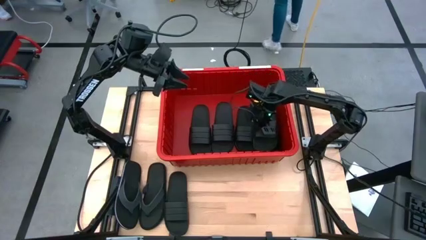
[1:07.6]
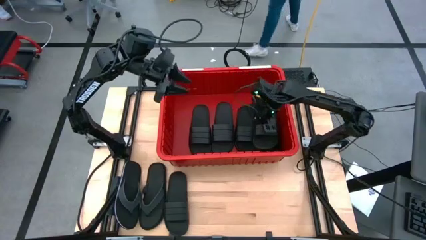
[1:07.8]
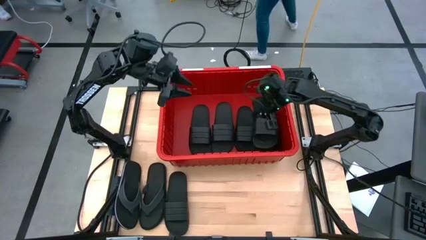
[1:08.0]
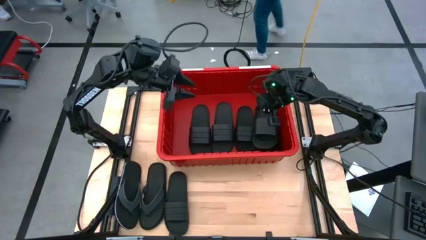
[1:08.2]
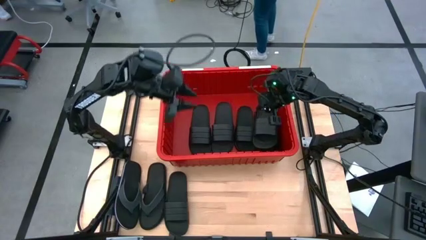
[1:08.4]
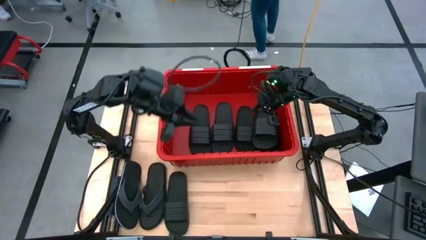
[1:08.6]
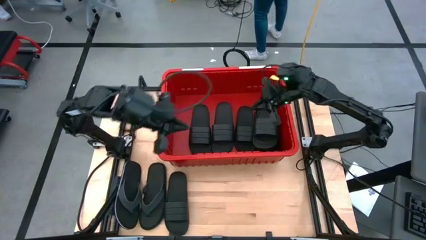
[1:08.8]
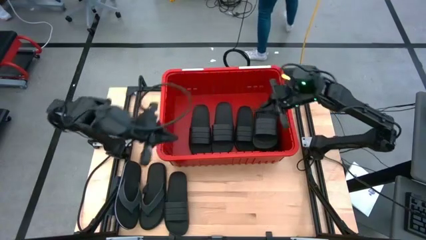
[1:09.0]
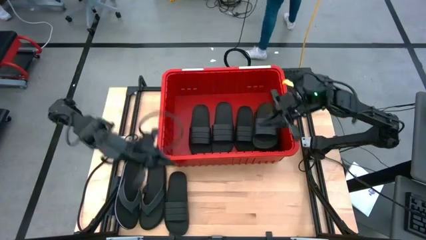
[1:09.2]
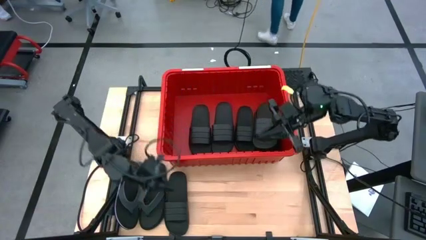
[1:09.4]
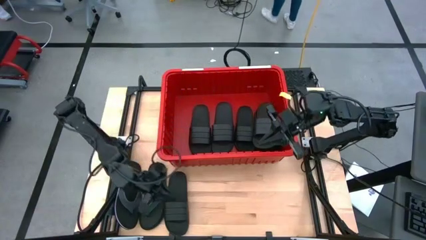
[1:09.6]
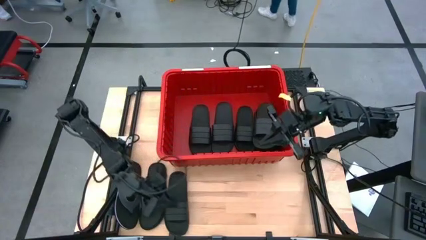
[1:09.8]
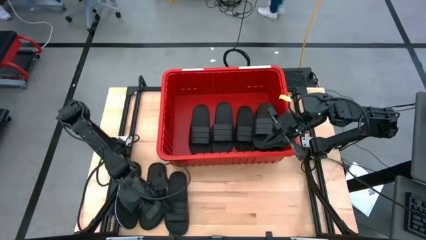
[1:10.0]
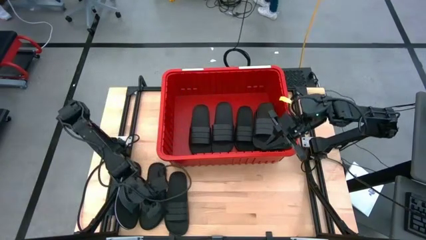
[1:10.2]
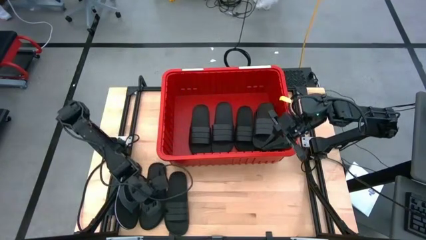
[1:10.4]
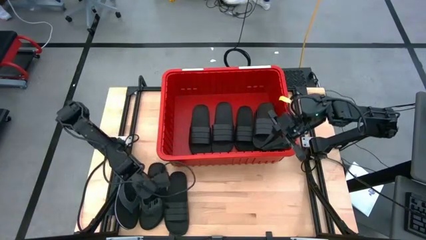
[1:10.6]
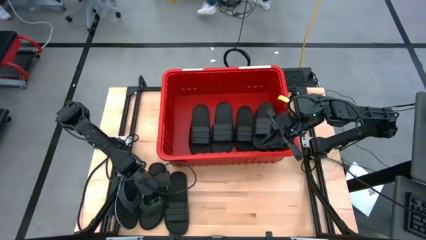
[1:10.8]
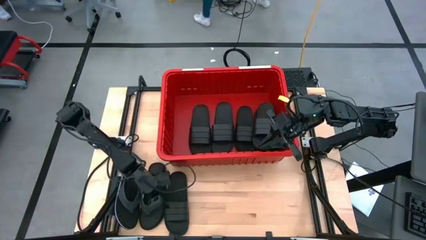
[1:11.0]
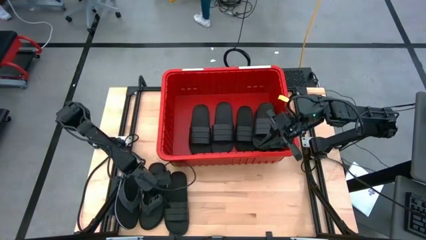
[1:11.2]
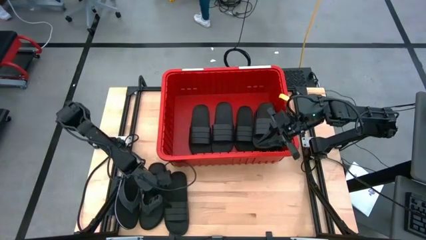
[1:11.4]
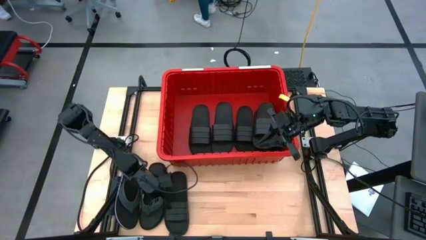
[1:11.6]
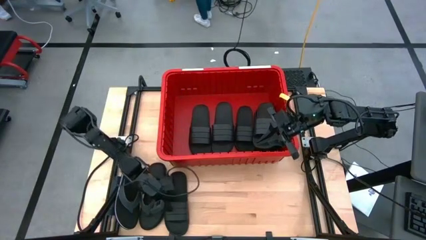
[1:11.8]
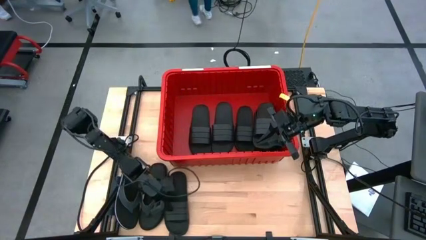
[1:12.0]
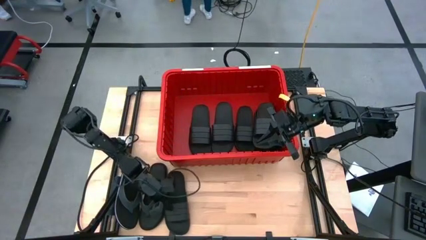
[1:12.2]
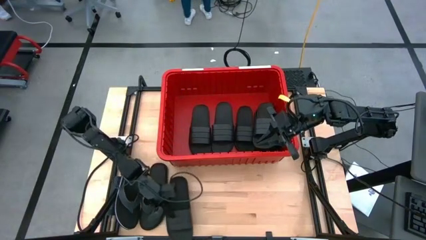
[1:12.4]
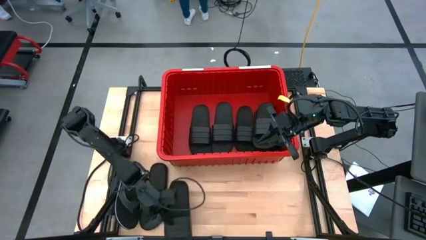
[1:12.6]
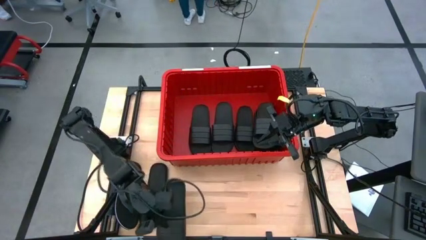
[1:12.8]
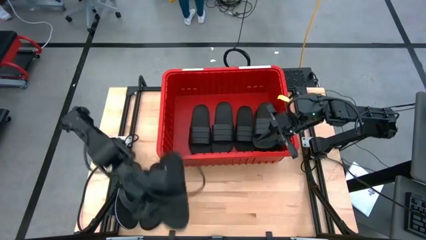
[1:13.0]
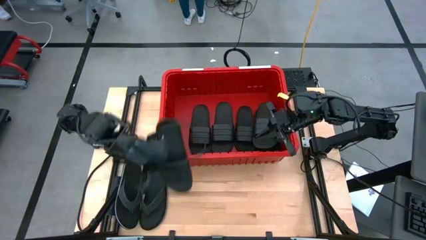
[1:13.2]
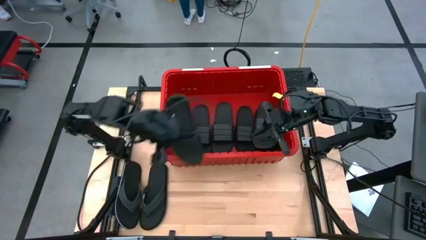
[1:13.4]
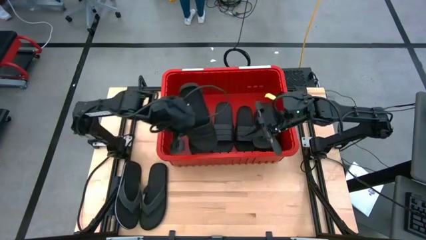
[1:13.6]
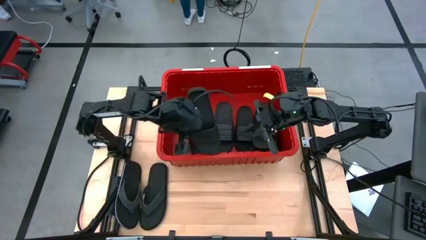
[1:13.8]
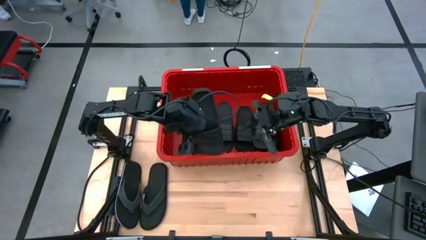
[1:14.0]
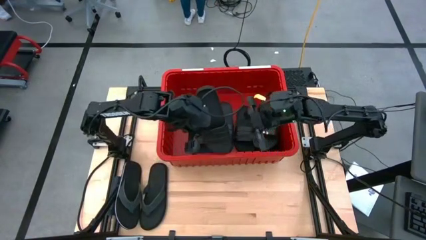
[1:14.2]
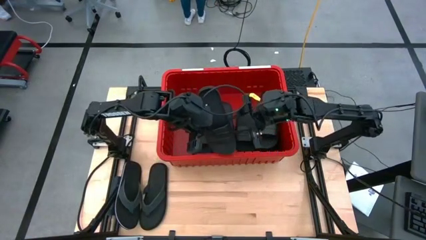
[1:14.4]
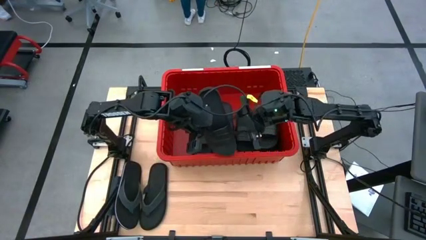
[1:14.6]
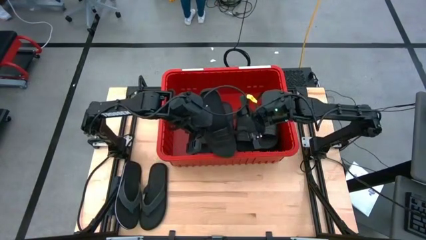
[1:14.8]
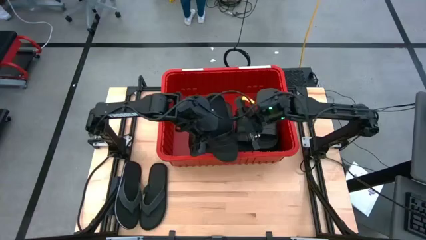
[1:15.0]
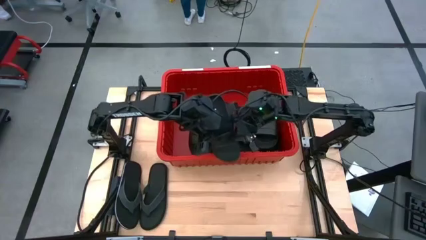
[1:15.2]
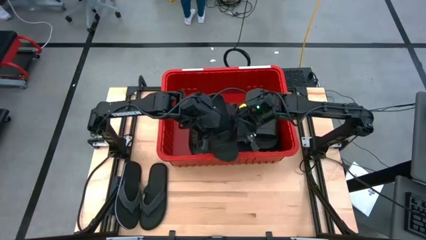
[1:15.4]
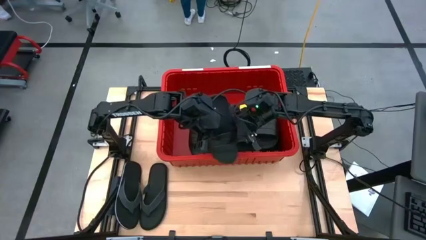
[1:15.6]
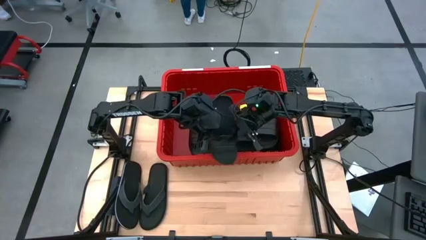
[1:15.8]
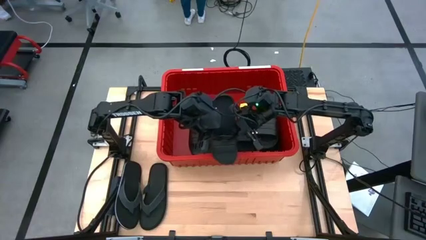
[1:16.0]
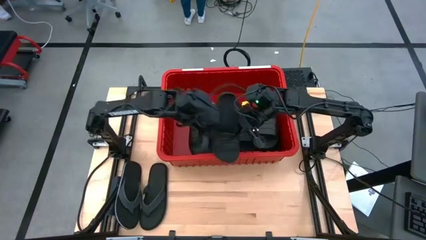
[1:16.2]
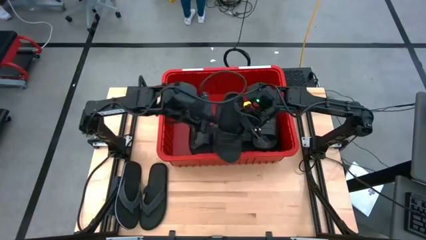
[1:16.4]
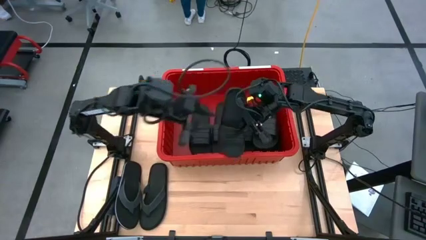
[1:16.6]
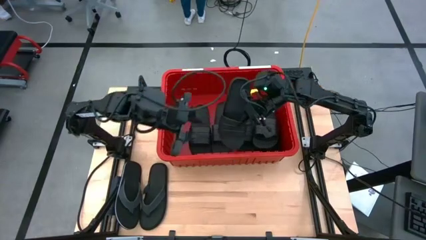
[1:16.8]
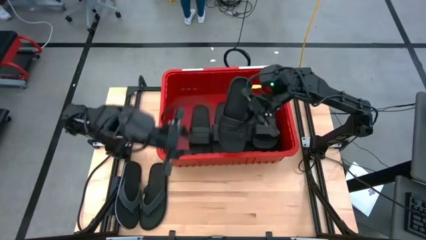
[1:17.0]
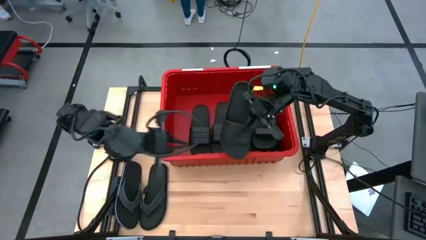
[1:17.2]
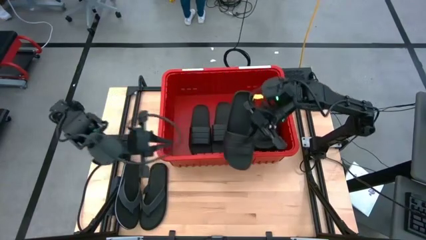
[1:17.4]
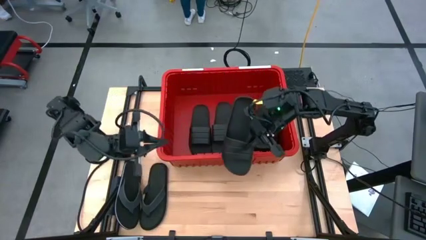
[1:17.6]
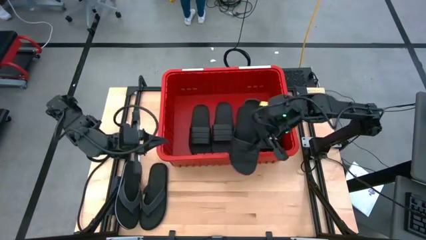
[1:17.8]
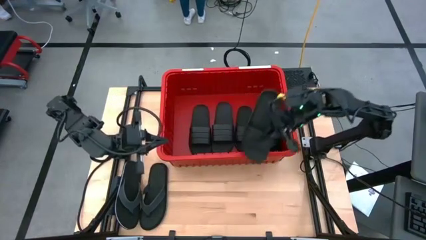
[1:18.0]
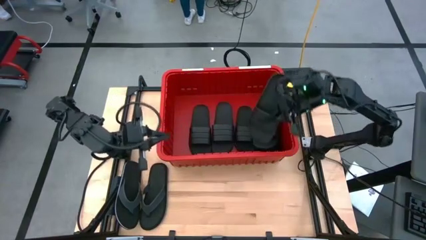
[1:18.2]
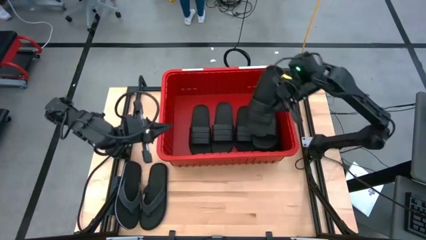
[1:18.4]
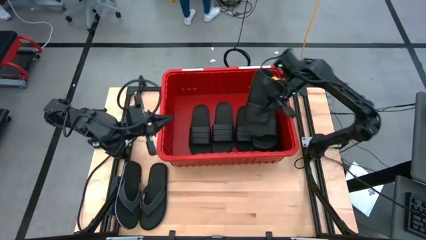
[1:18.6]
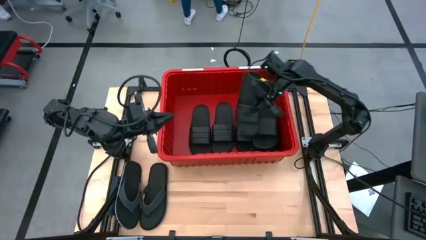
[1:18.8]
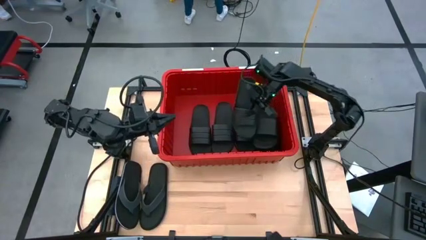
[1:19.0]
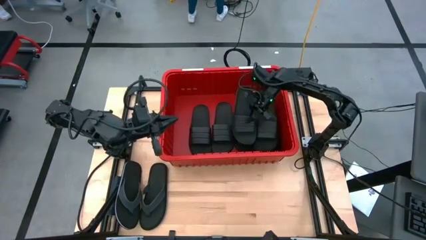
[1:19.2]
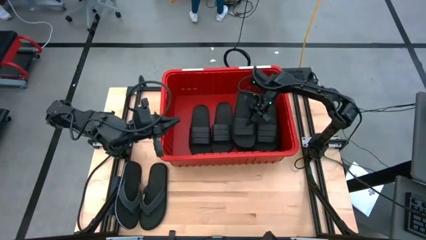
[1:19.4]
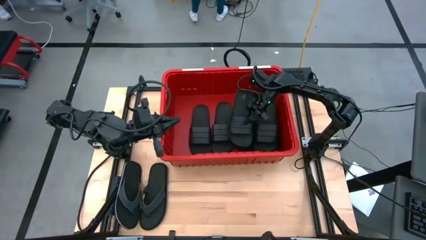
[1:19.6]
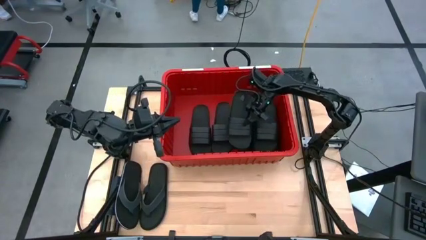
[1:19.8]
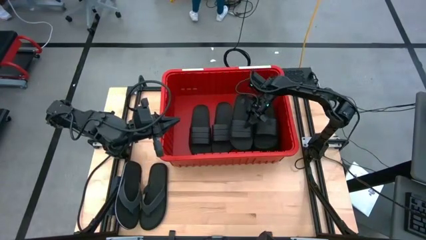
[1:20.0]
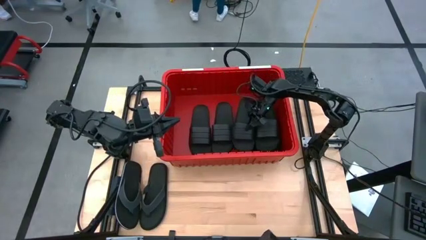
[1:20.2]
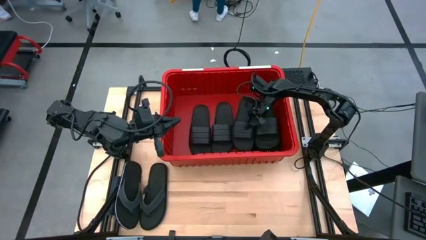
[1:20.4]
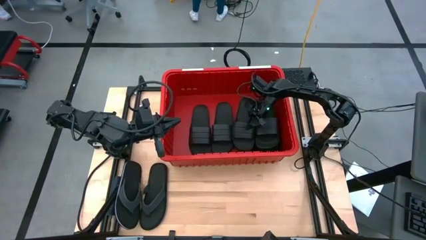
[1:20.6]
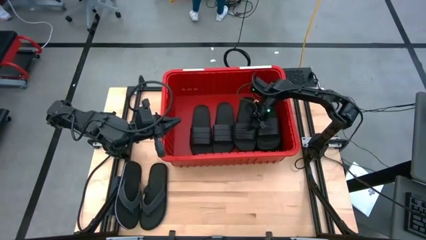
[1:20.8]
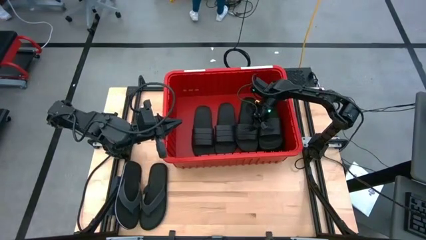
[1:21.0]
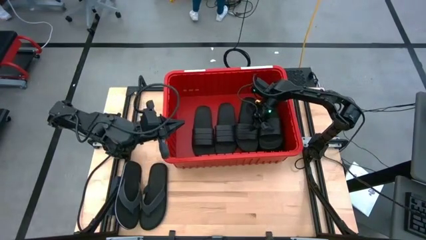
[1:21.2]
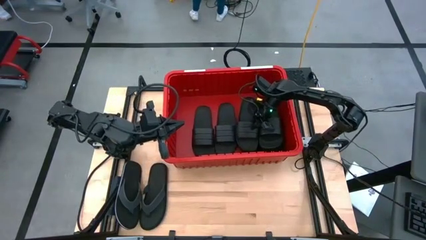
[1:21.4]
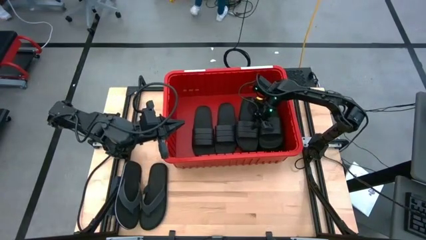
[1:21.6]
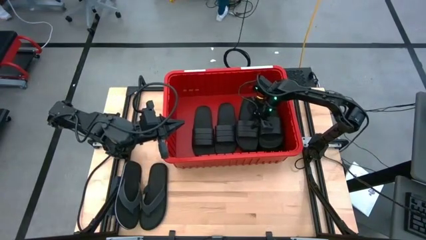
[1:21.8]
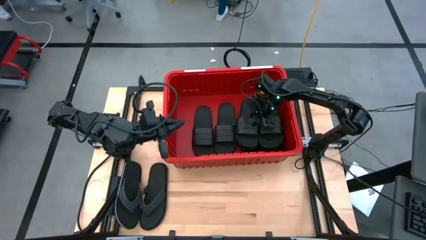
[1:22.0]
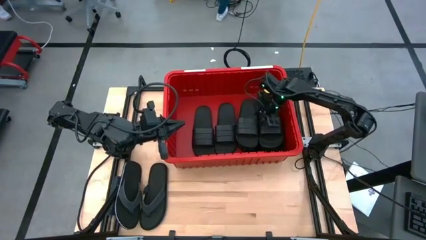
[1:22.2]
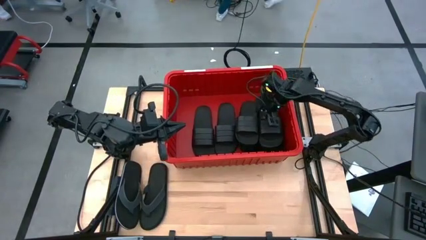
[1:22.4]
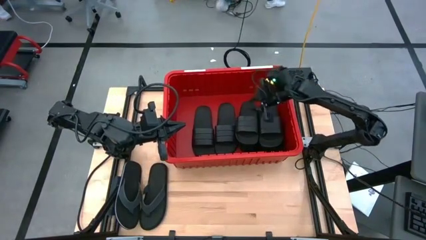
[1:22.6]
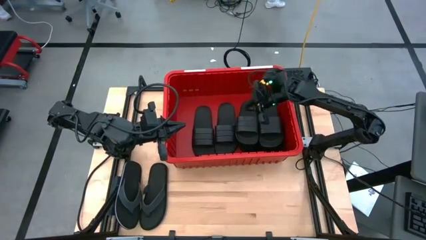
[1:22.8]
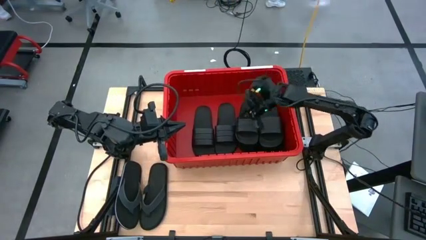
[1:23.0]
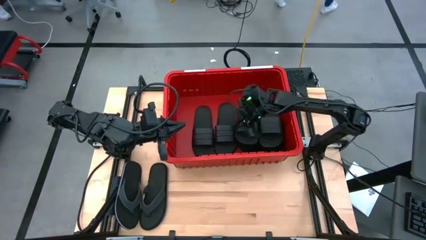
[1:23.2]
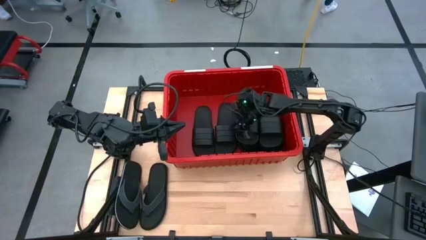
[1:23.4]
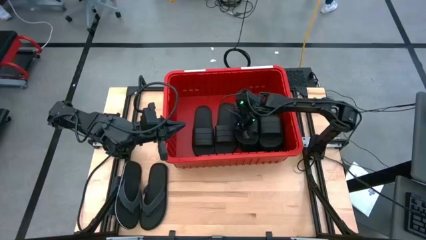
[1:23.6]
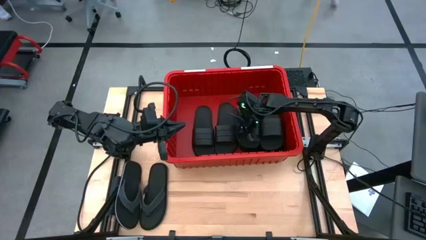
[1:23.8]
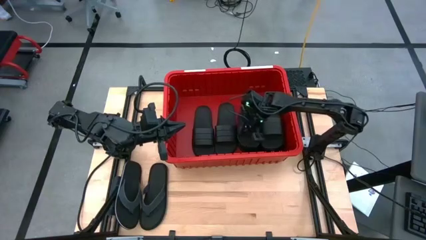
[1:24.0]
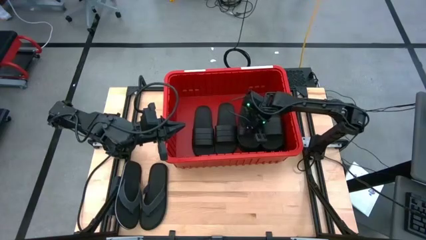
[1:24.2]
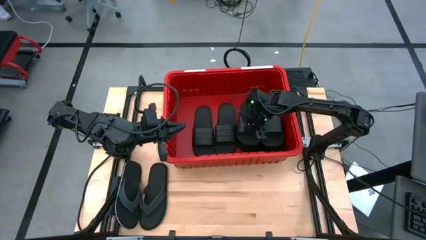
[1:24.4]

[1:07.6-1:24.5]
Task: Pick and place slides into bin
Put the black slide into the red bin
